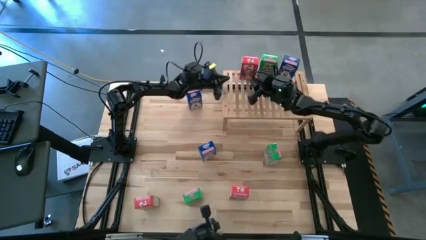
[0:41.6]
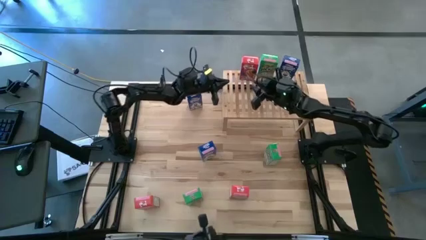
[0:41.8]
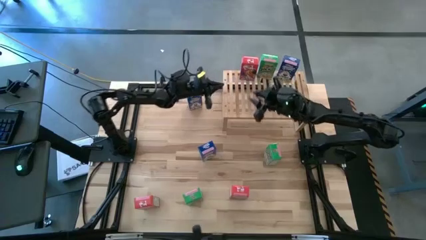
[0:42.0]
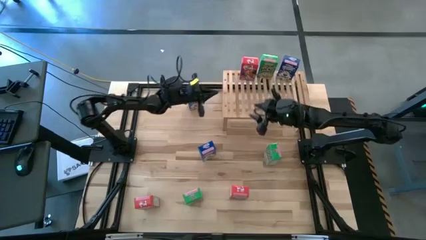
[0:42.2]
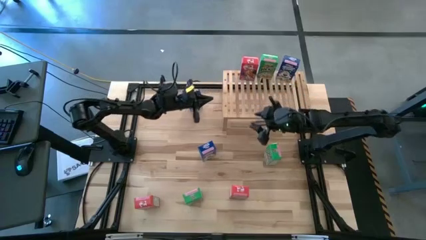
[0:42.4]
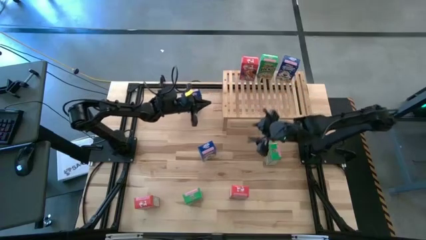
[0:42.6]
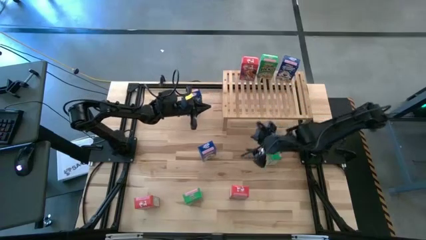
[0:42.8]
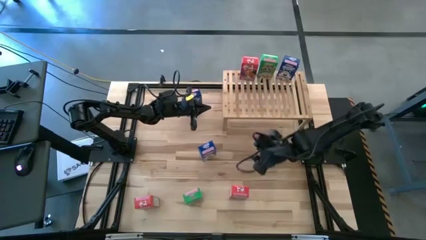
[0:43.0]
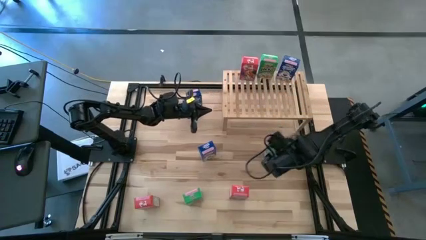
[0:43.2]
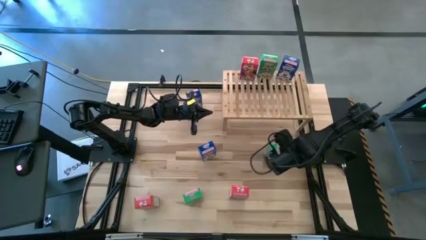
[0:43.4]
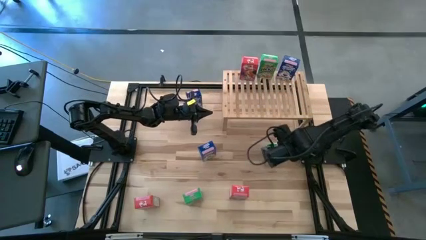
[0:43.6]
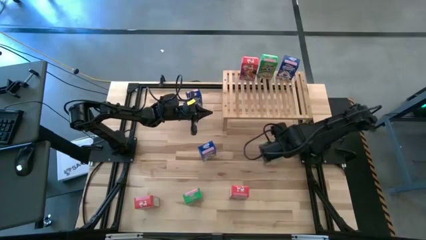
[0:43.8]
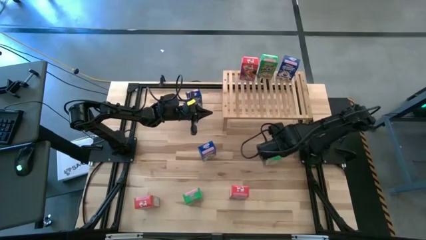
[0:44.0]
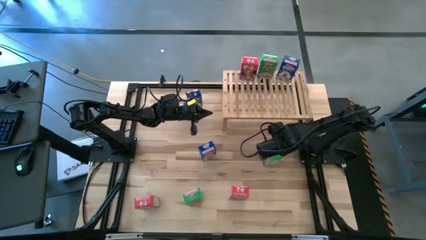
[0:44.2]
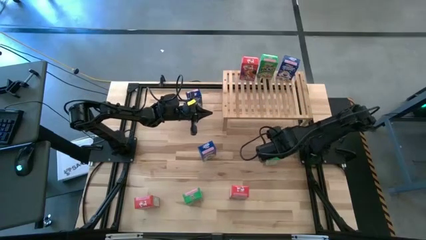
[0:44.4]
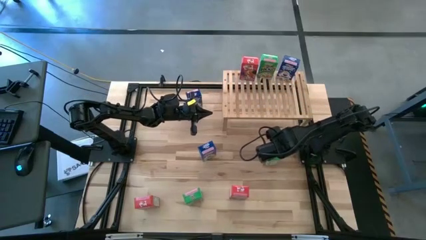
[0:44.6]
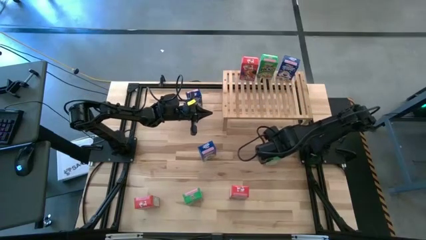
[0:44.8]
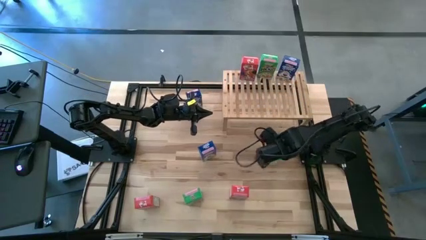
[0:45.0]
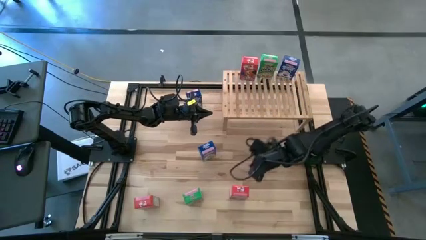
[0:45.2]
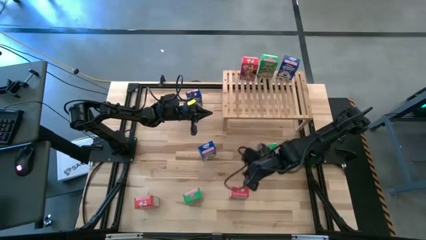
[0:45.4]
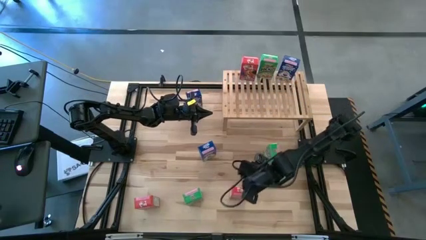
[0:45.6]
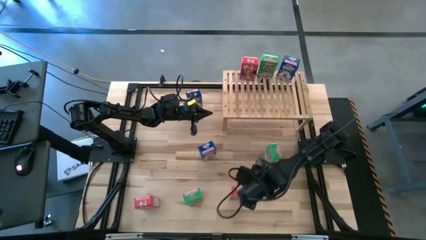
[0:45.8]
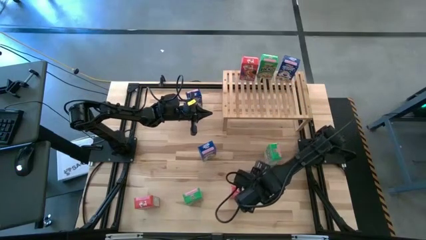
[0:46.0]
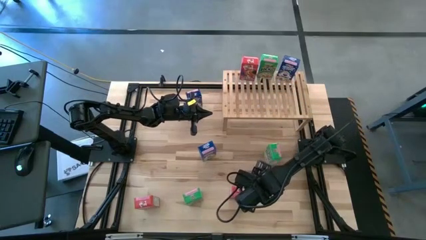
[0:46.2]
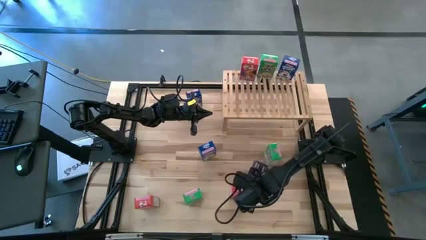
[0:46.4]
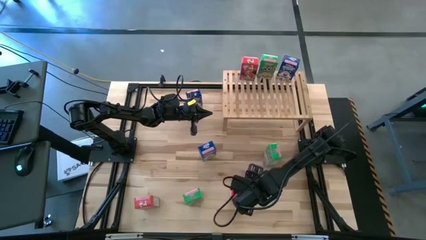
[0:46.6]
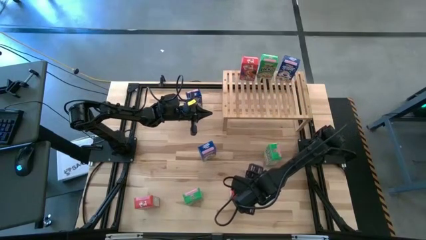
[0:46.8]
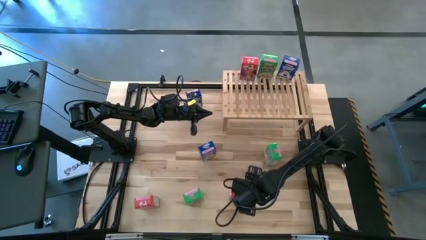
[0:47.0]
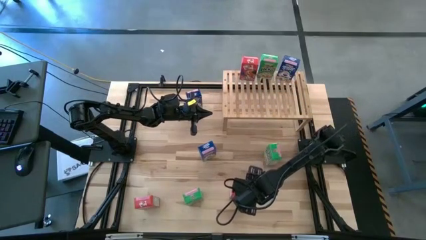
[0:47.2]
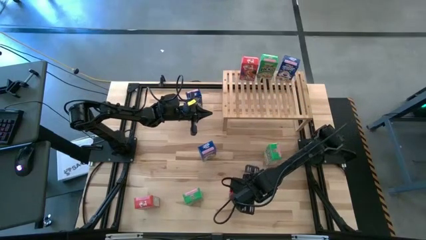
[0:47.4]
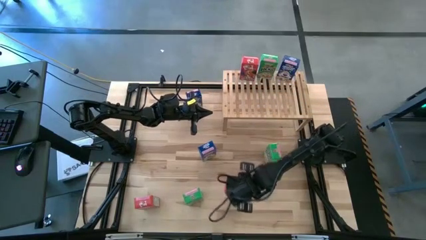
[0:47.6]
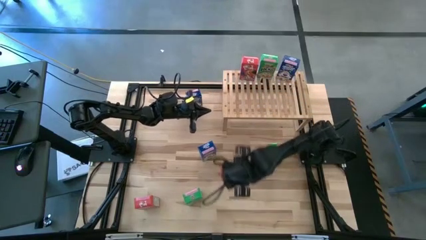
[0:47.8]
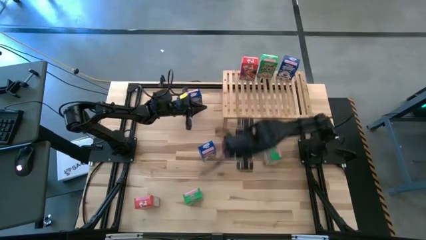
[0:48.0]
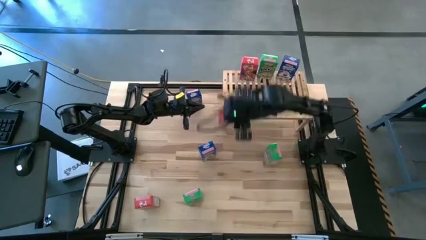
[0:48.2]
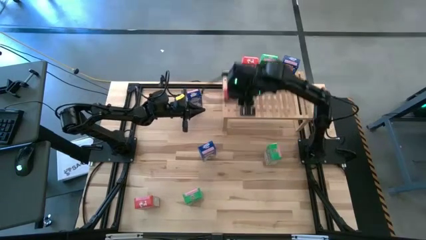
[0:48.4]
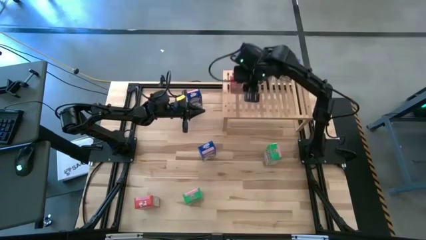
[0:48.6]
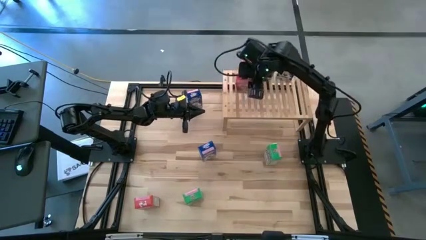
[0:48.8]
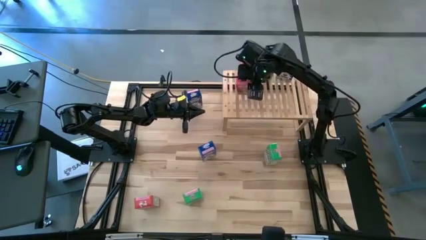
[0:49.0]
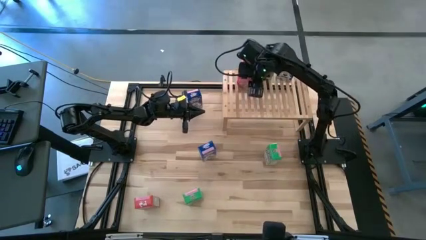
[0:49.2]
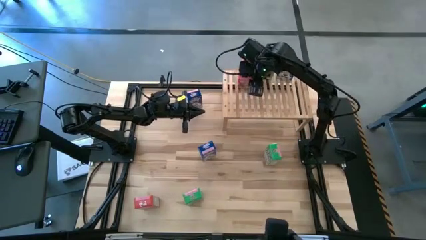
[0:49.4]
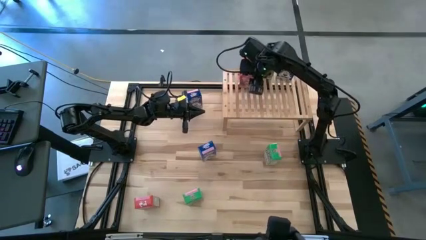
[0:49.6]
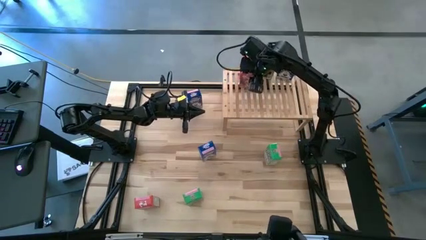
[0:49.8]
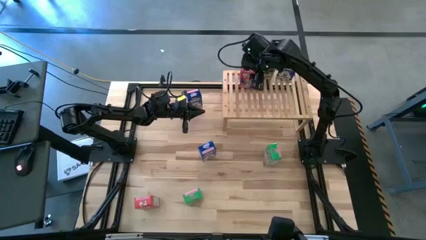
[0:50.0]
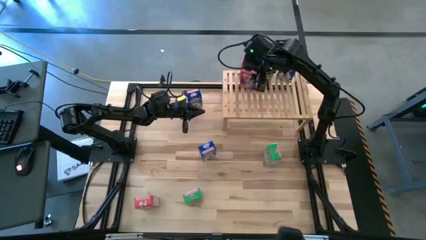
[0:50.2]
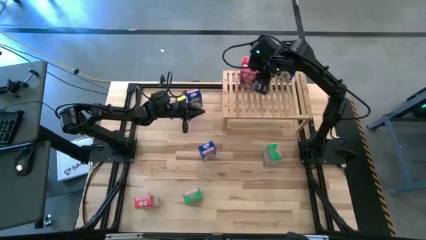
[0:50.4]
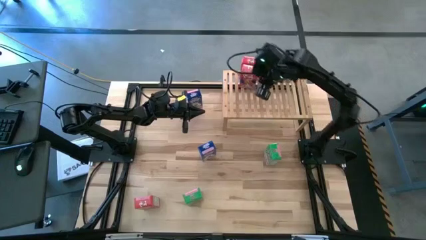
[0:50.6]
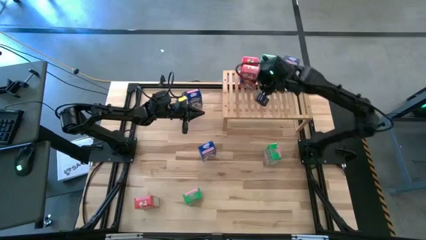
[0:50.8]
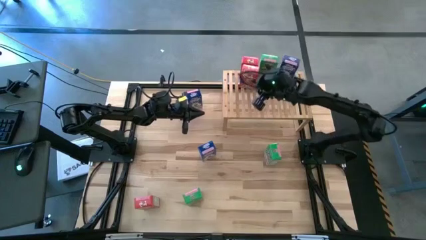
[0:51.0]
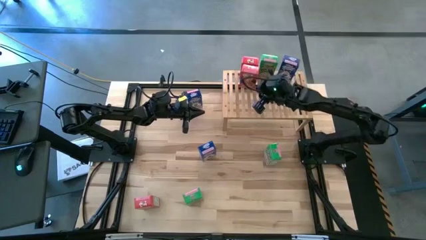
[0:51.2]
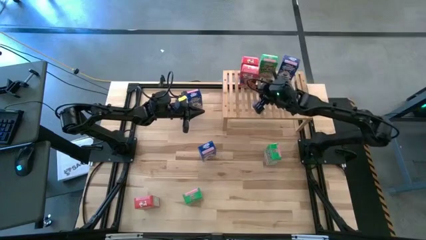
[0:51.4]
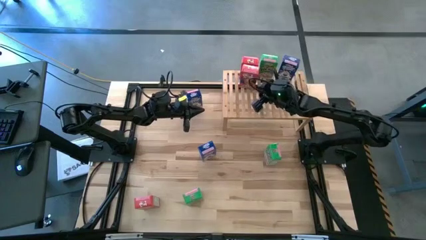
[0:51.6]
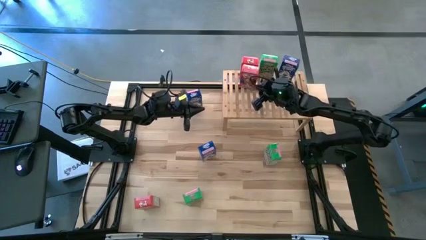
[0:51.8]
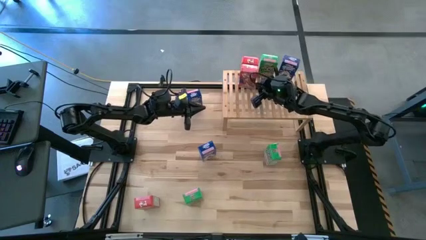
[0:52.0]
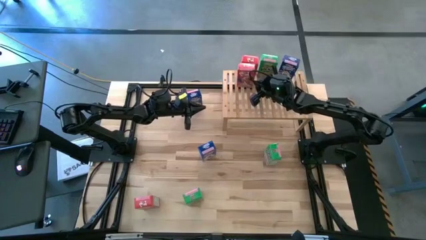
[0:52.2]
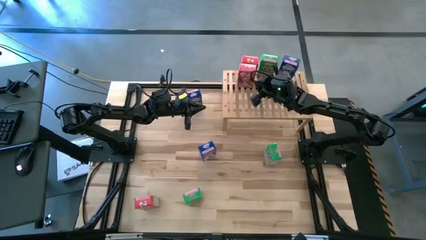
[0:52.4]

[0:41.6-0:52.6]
Task: Stack cereal on shelf
Put the right red cereal box on the shelf aligned with other red cereal box

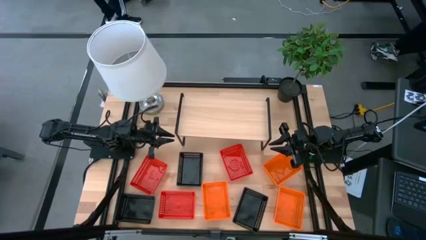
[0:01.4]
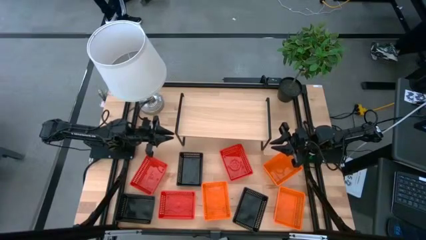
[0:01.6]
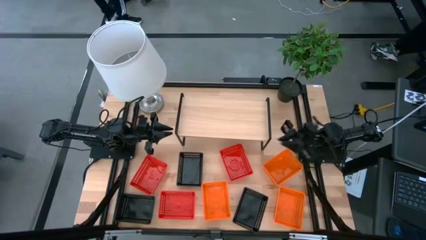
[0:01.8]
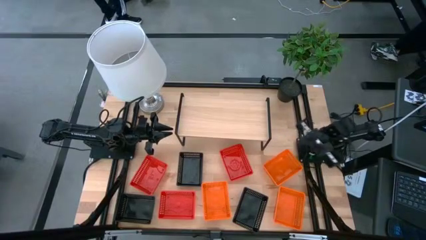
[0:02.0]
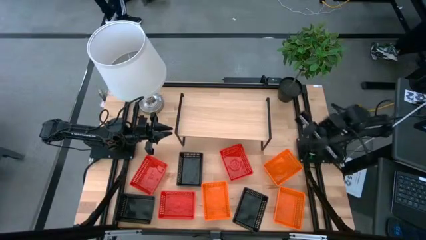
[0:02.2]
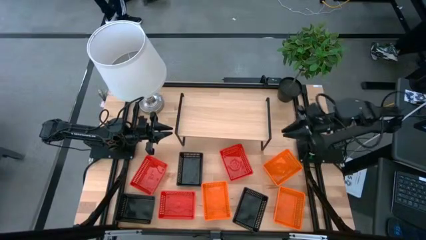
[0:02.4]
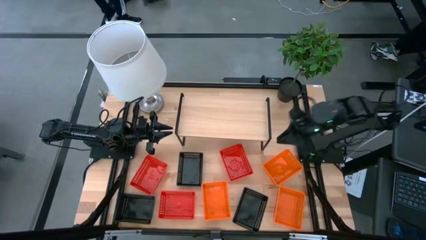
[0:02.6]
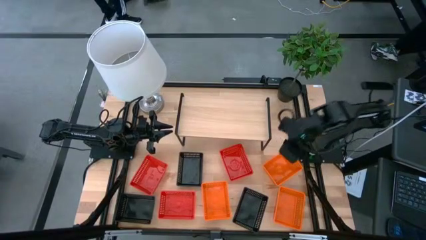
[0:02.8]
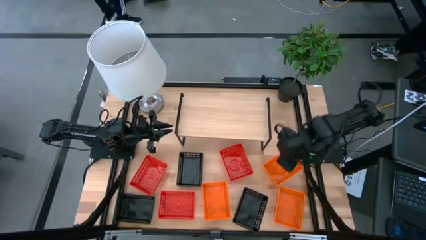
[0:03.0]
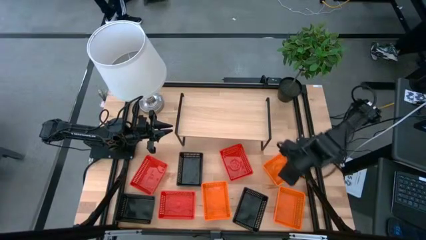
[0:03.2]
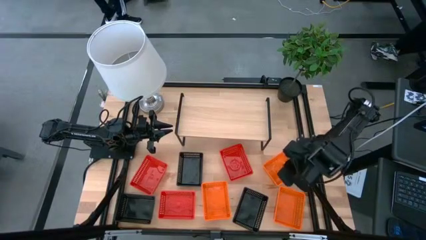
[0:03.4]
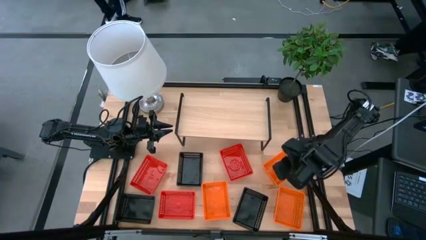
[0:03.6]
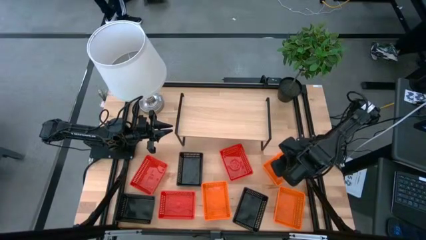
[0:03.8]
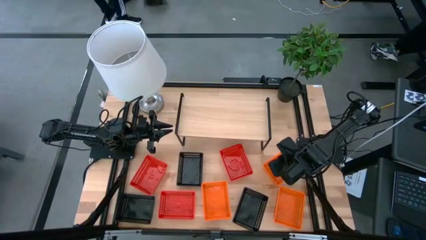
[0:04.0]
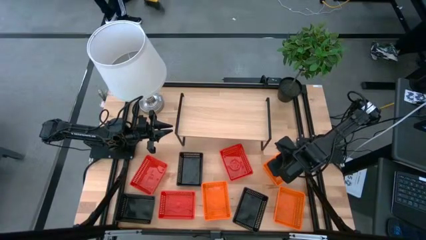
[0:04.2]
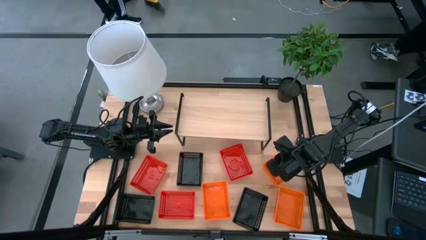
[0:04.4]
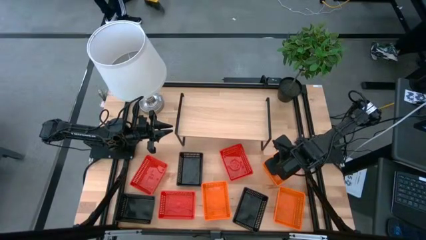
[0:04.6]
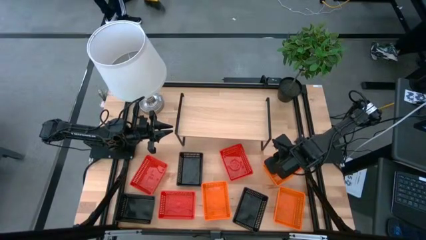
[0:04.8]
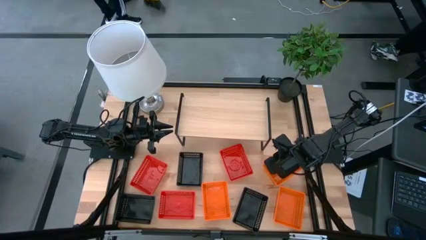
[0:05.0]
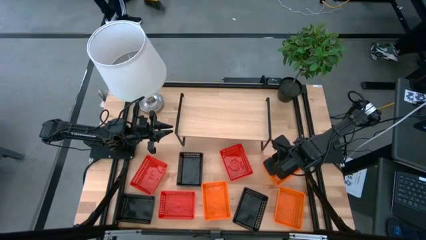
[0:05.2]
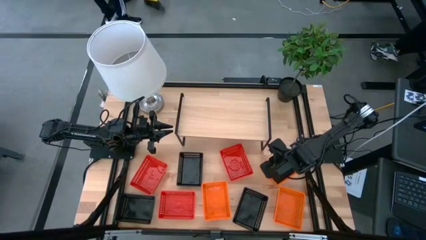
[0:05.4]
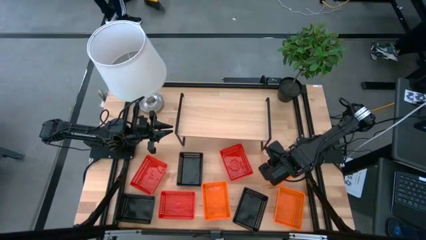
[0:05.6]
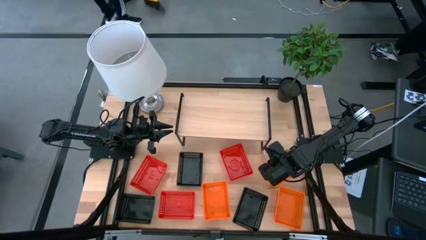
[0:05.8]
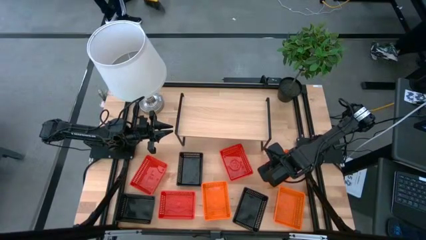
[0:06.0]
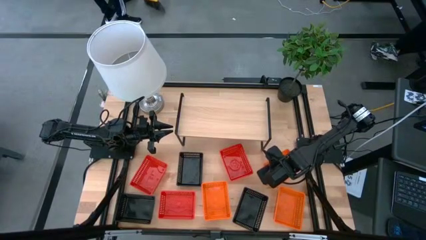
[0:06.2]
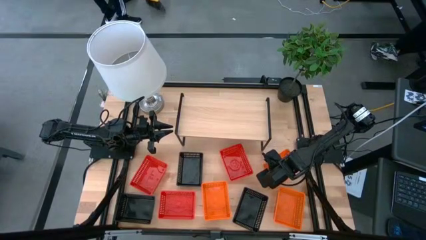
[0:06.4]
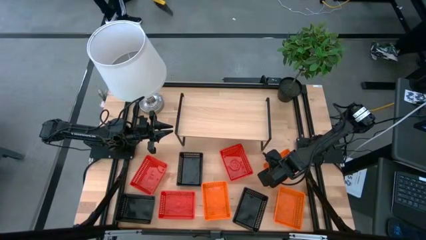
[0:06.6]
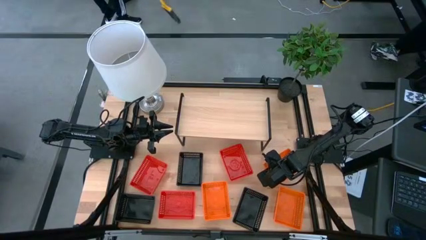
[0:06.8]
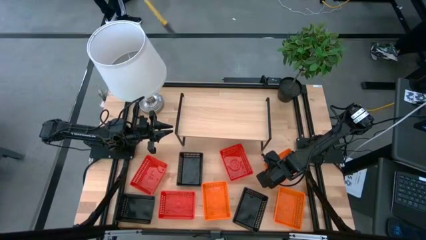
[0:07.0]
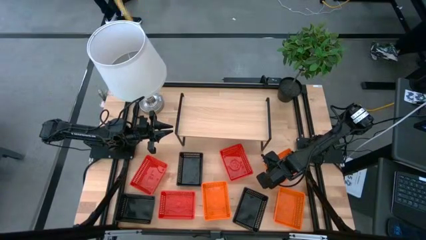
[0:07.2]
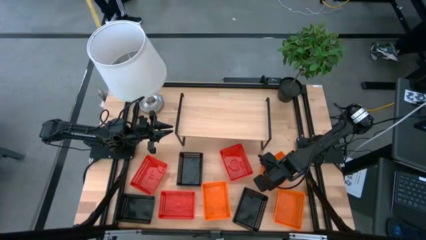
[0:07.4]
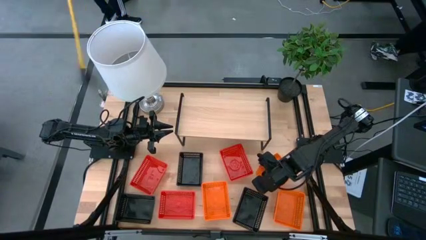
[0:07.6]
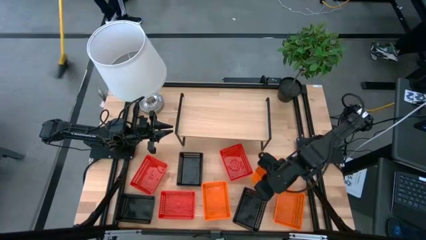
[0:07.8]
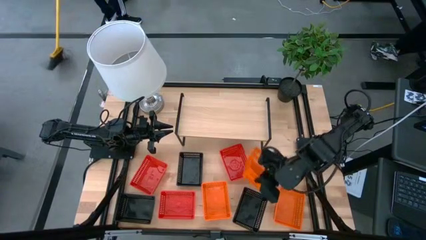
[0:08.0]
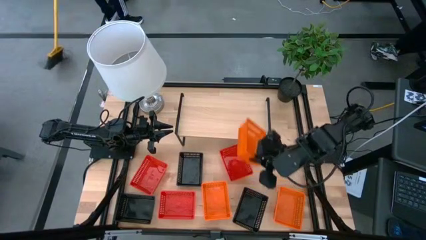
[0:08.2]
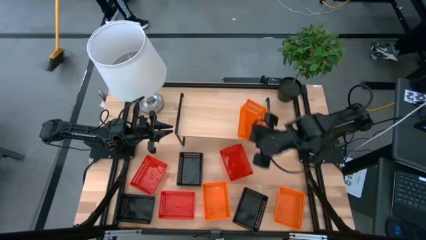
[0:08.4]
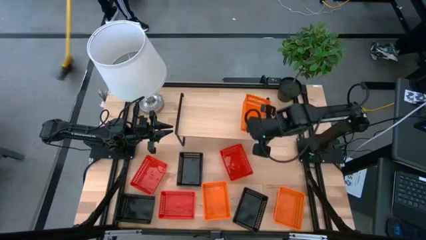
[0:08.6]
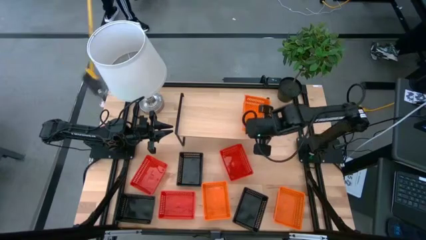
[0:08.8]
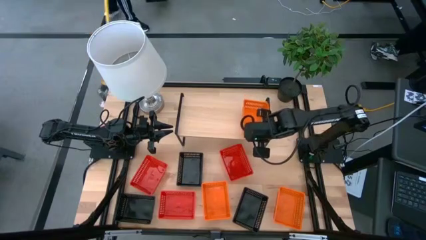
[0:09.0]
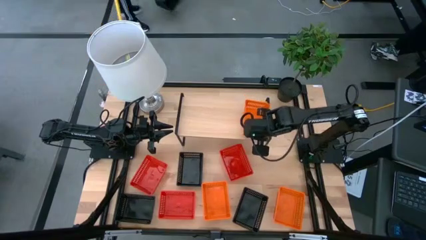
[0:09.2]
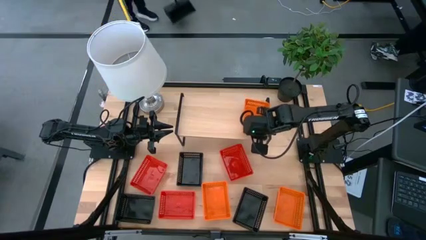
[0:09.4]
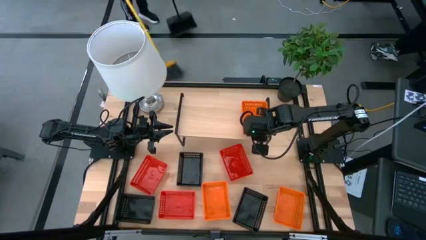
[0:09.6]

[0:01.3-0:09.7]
Task: Stack baskets on shelf by color
Put the top orange bin on the shelf
